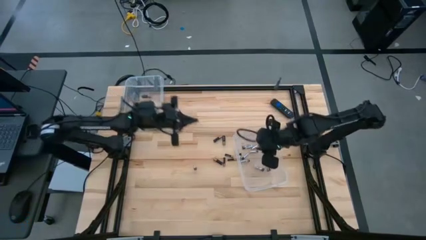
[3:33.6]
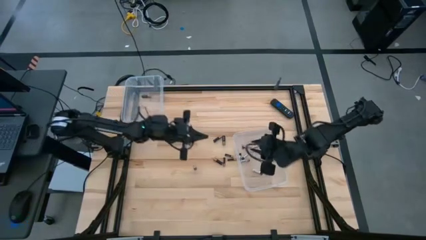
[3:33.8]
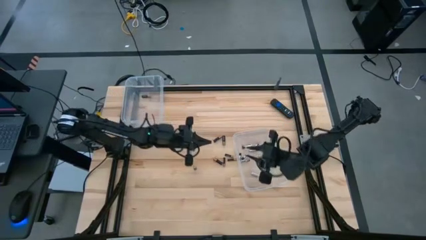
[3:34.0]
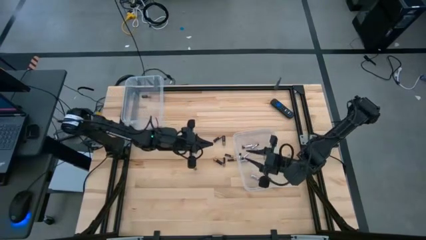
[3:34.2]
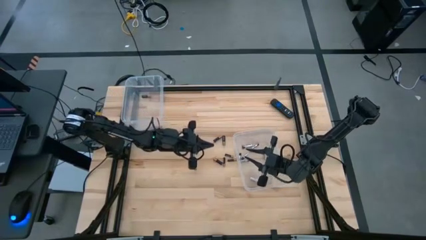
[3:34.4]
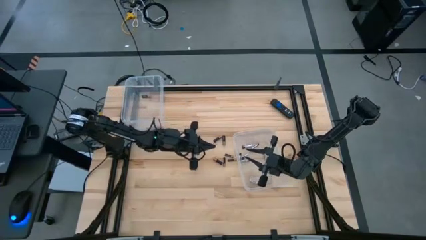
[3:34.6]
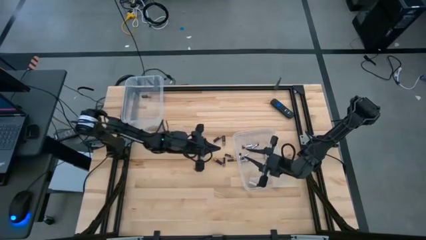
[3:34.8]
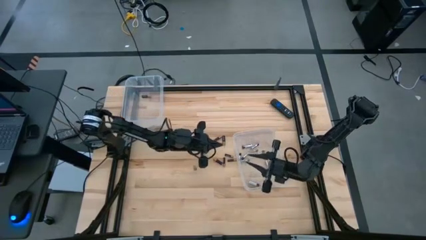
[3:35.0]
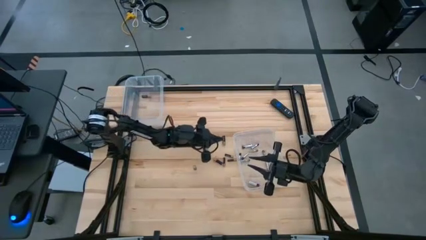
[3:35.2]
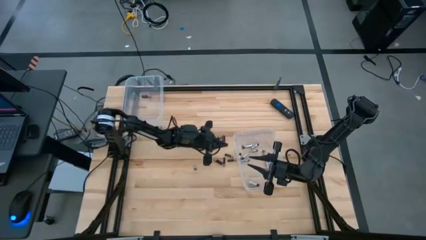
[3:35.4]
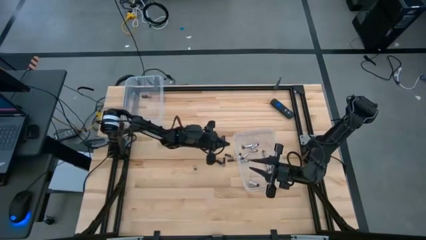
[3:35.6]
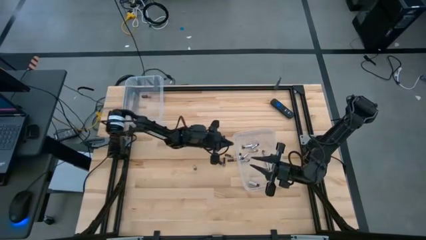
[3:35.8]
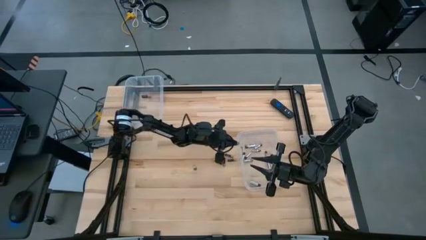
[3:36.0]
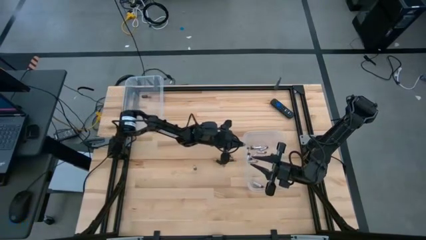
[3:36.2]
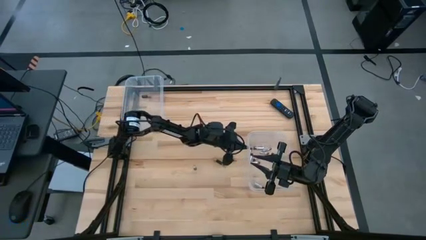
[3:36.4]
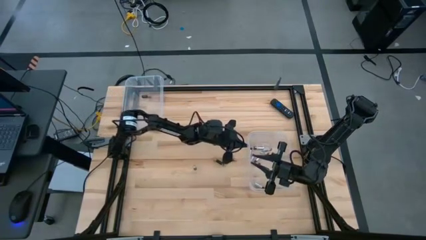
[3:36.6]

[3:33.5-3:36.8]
Task: Sort batteries
Adjust the bottom transparent bin

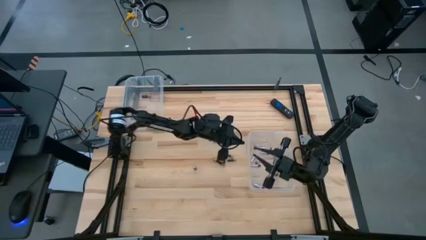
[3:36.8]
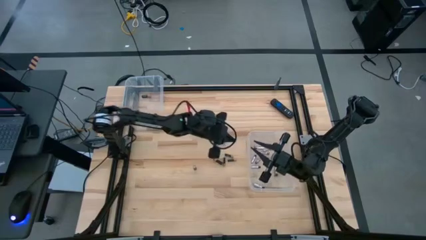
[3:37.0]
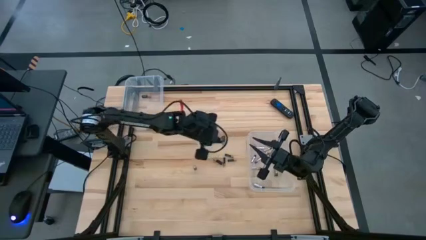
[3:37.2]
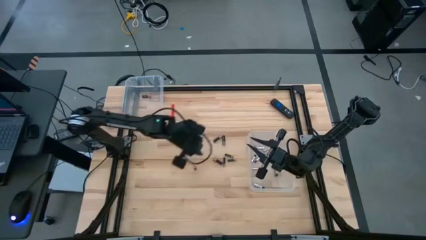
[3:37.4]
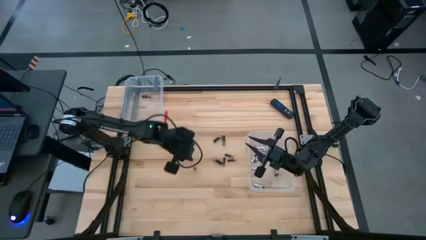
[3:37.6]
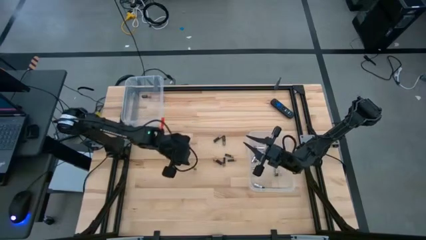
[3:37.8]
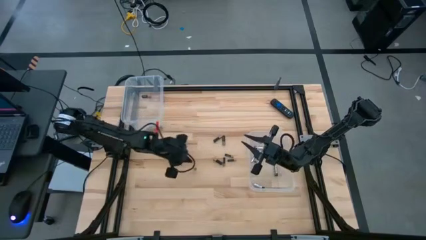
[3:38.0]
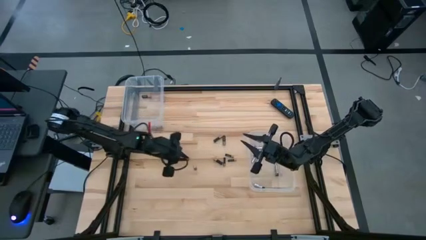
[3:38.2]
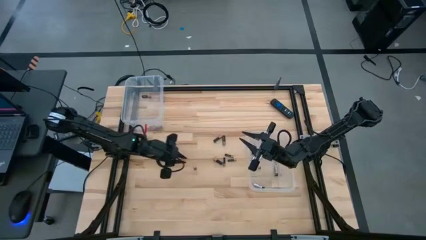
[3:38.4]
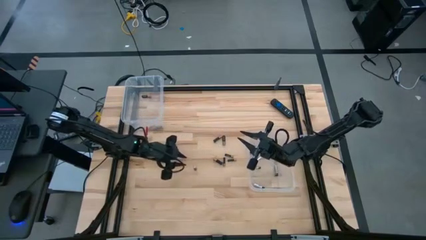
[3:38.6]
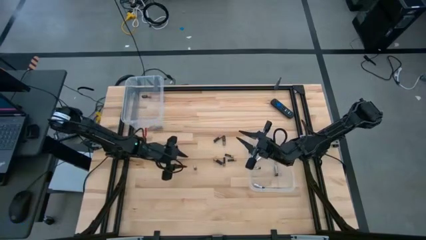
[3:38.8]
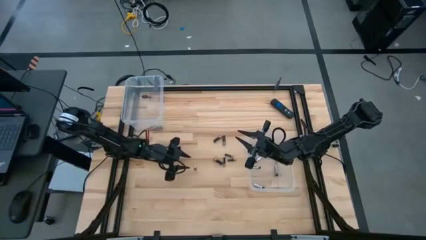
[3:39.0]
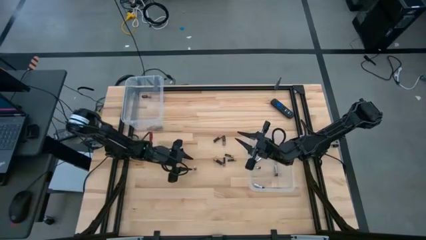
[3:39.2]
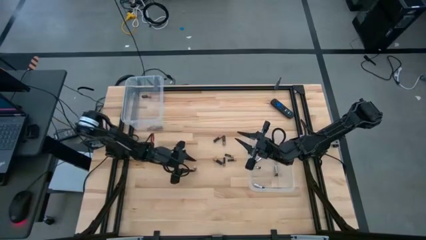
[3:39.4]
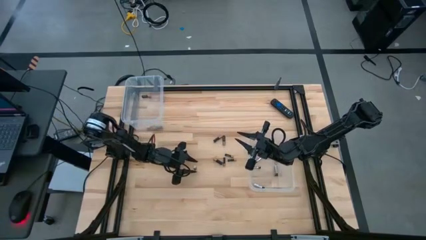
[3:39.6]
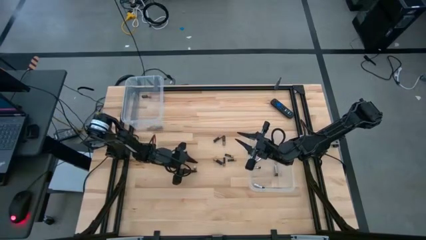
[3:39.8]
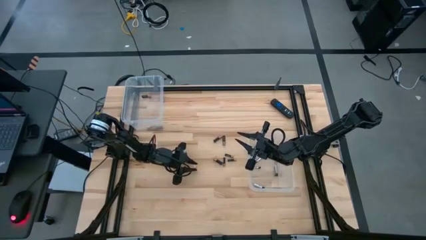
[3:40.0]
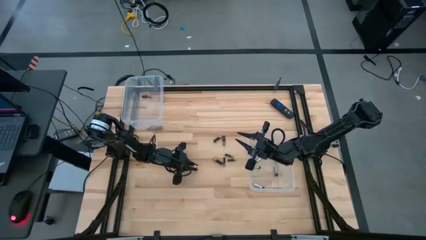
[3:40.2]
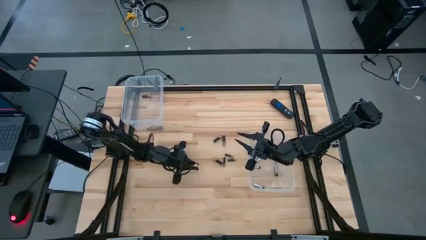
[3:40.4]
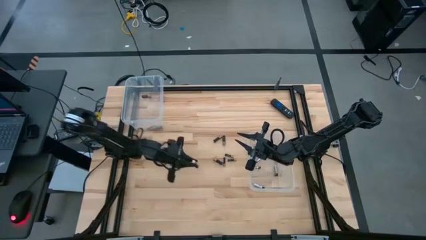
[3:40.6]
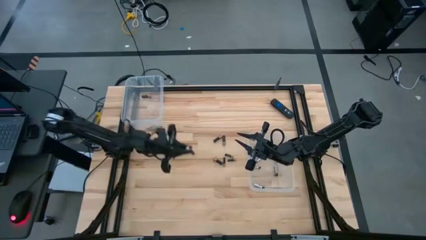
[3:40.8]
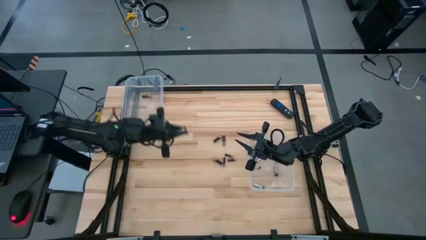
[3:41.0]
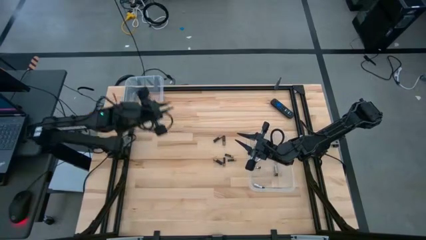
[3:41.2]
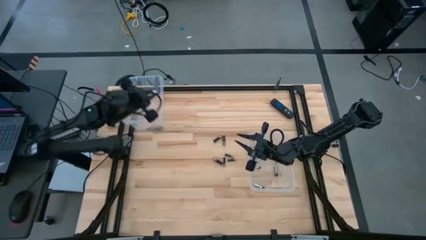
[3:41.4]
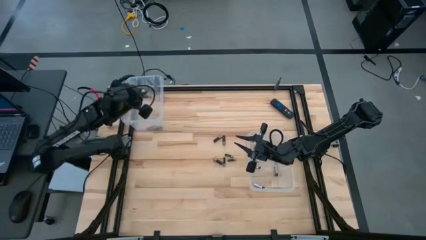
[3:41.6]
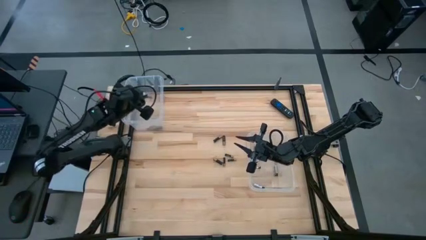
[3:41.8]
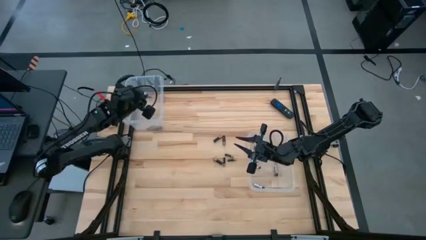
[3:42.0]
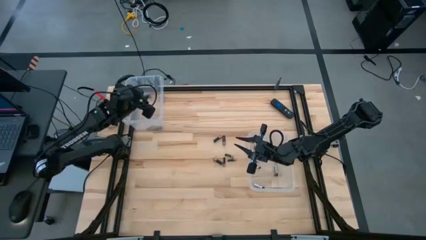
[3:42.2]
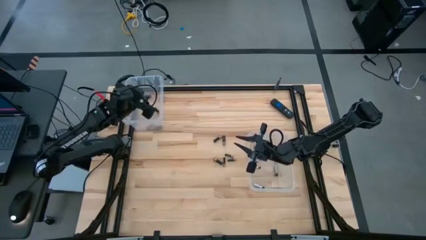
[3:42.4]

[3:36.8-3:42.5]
Put the black and copper battery into the top transparent bin

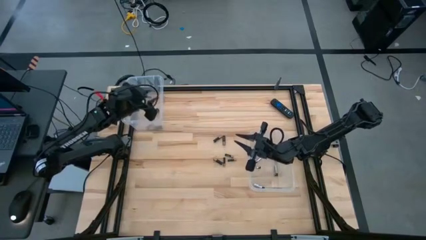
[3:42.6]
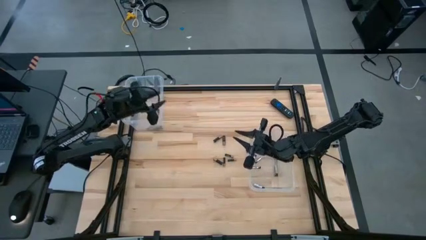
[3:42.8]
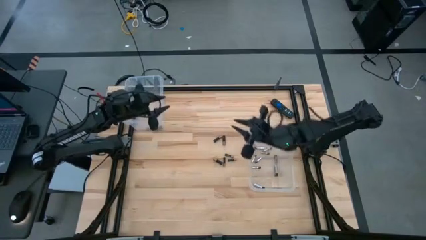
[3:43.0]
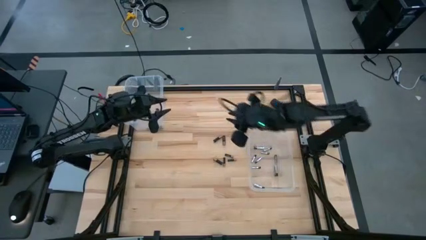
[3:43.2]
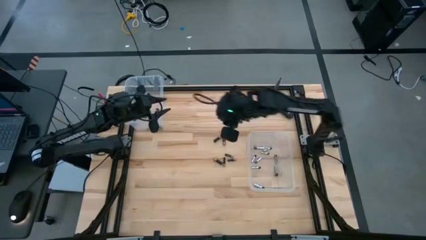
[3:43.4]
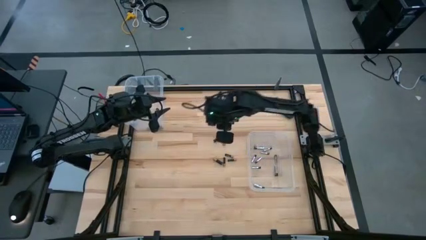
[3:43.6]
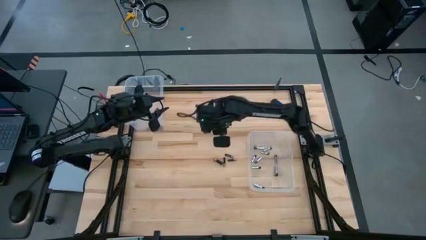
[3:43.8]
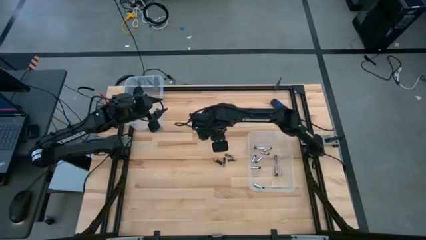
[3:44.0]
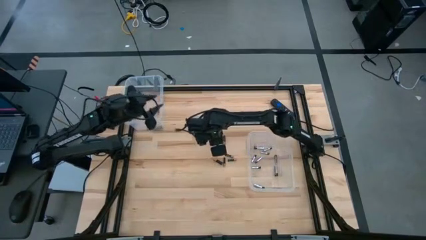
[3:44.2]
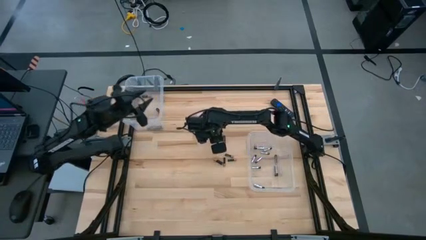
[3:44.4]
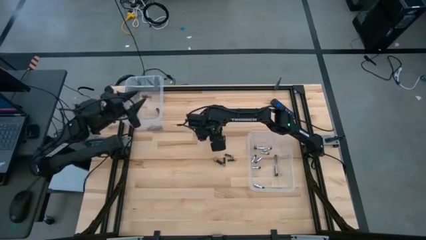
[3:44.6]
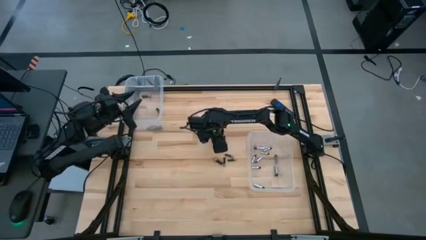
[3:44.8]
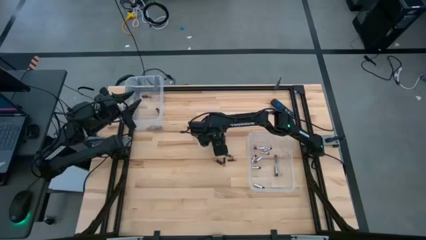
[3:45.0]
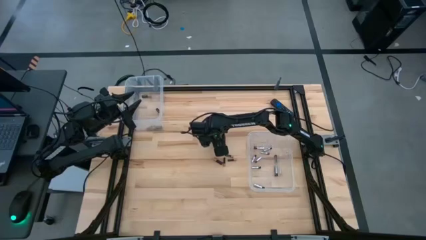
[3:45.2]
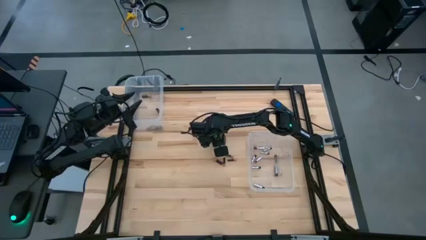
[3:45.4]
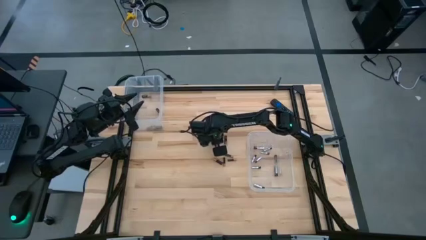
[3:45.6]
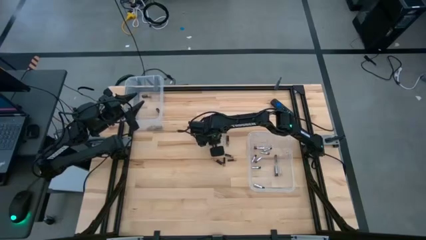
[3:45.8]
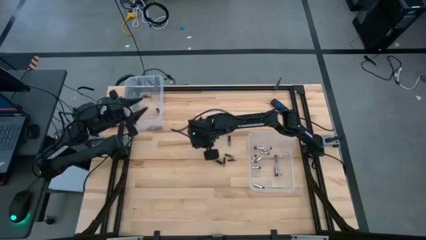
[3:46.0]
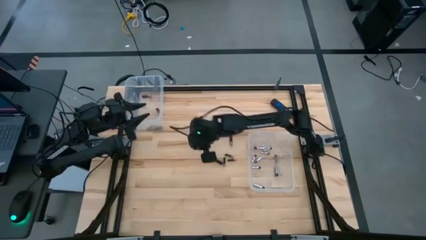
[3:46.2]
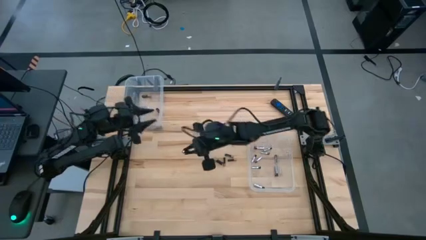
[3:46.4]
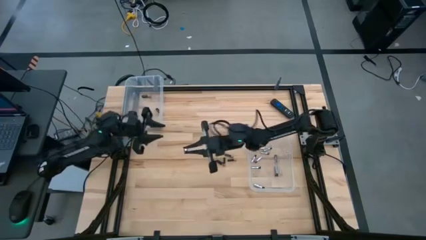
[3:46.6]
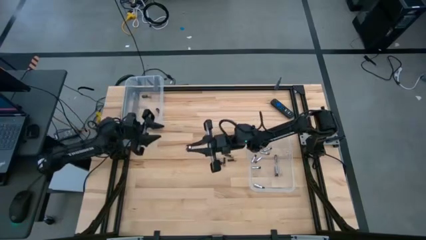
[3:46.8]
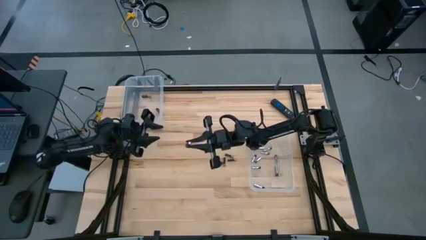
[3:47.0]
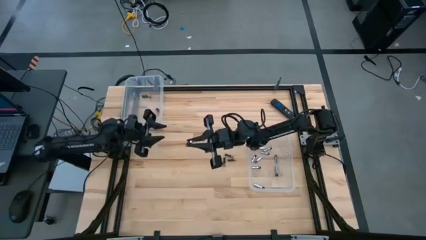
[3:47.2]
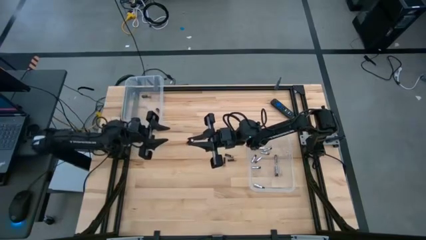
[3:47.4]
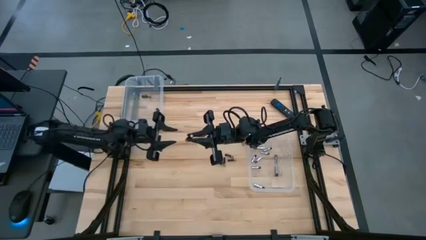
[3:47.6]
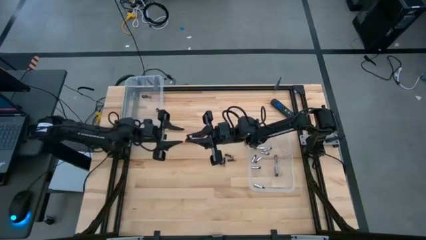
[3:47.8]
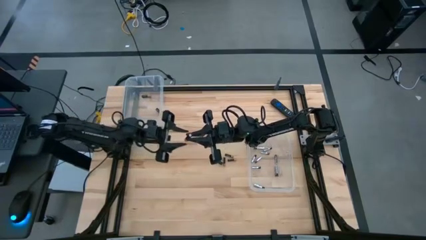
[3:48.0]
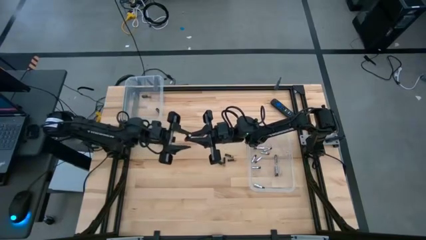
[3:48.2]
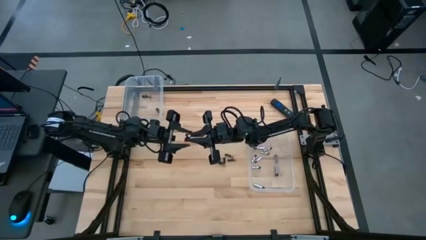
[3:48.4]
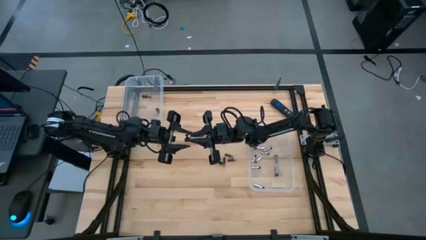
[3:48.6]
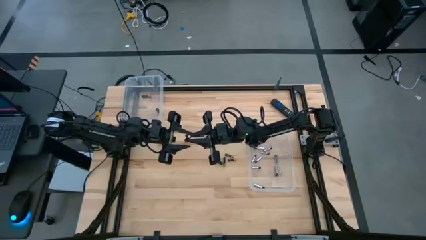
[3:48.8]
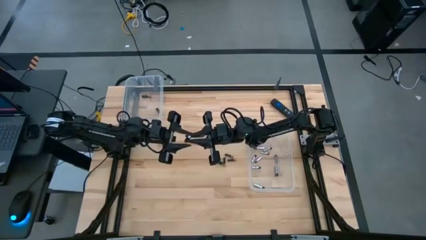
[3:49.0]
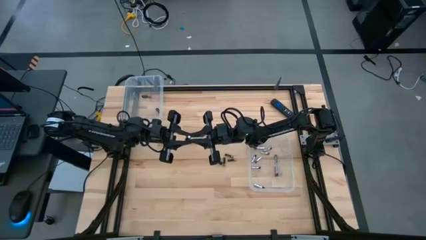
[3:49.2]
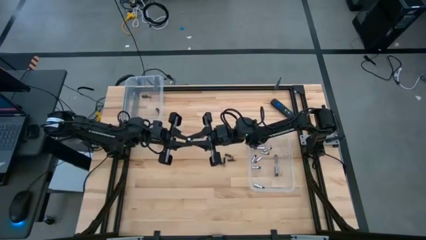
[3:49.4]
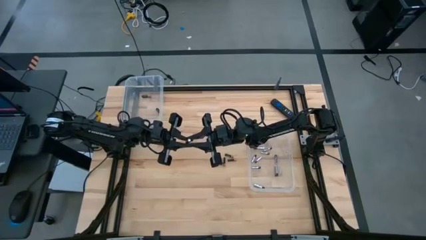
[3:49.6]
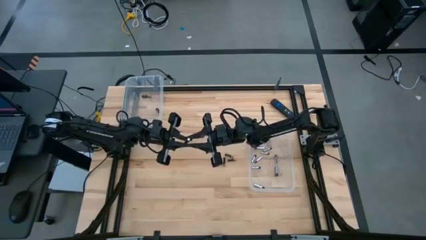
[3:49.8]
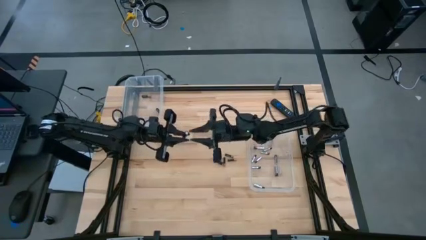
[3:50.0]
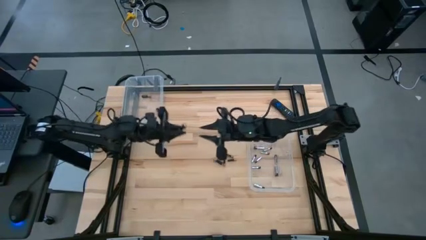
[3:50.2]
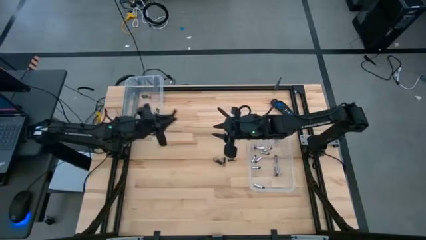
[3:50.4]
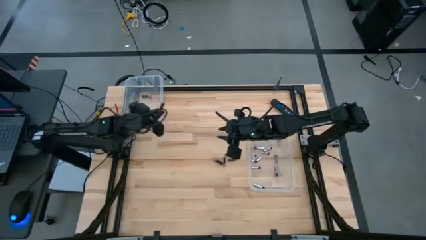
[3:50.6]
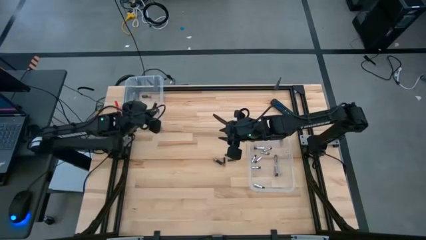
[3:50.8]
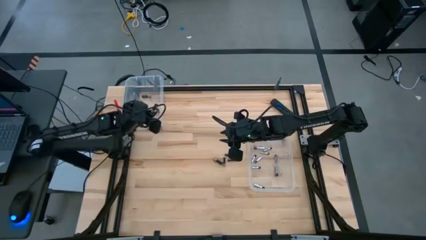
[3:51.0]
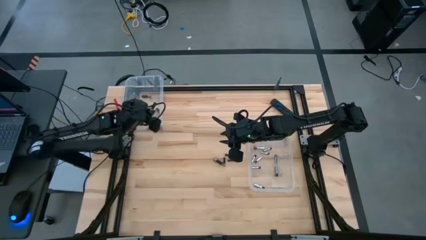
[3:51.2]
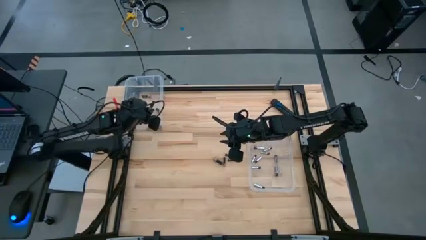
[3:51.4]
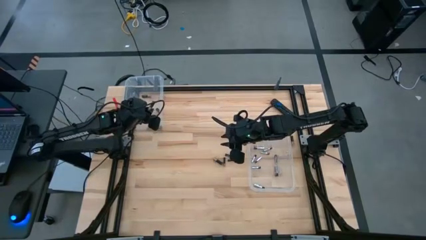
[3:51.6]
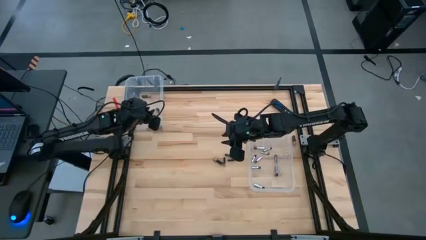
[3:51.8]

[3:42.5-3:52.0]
Put the black and copper battery into the top transparent bin
